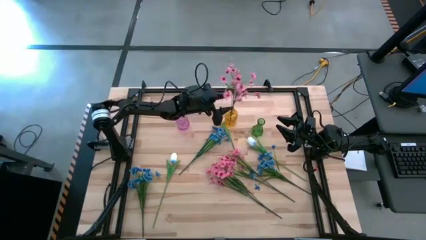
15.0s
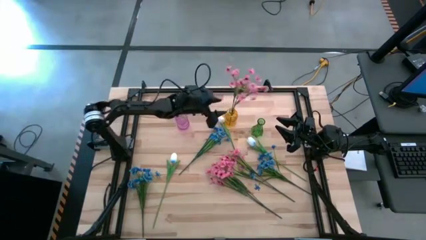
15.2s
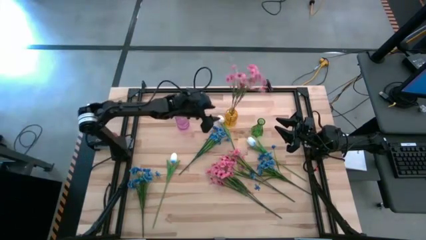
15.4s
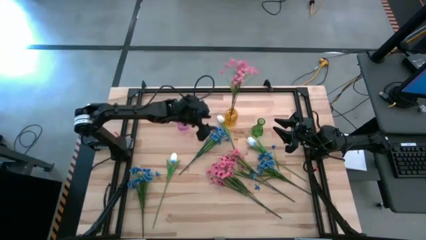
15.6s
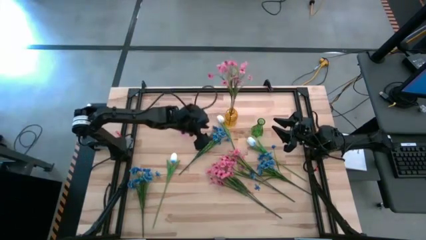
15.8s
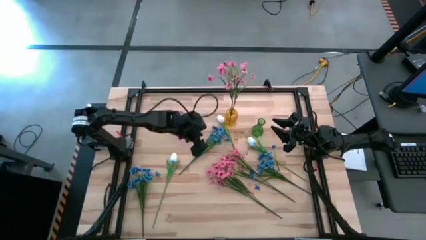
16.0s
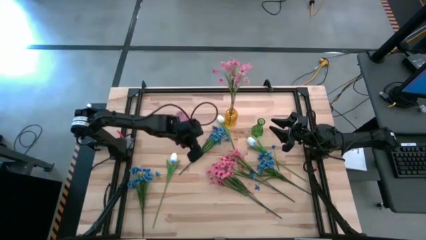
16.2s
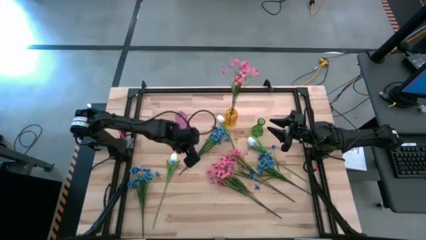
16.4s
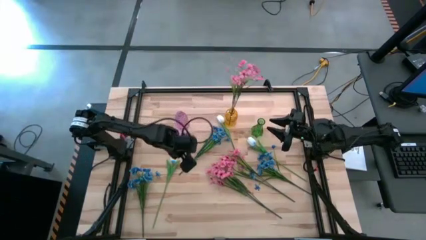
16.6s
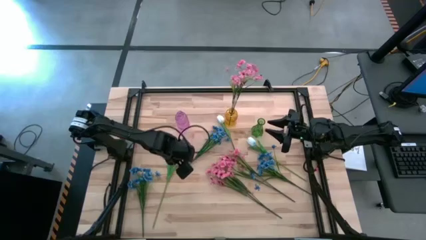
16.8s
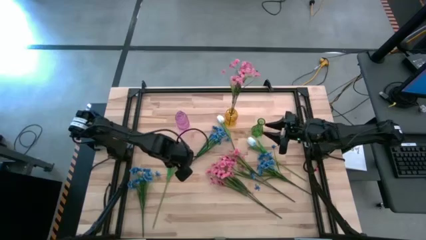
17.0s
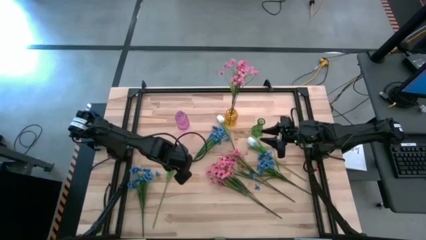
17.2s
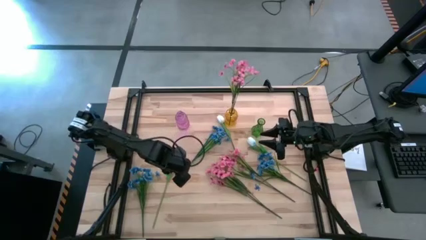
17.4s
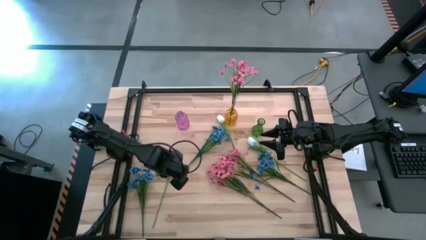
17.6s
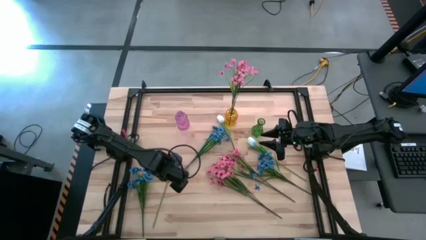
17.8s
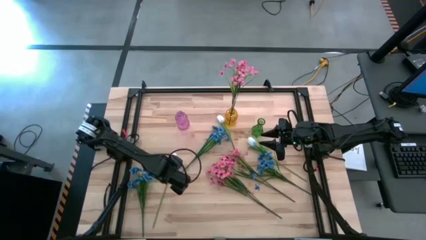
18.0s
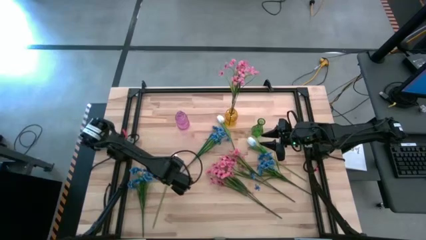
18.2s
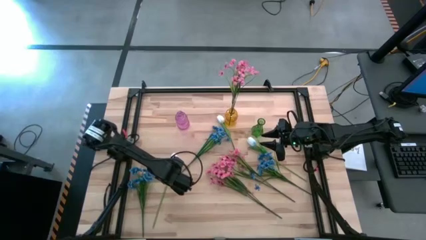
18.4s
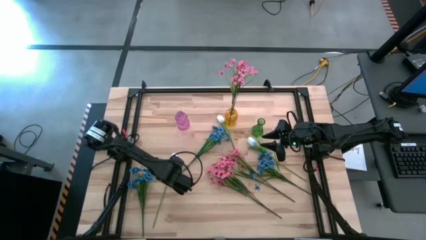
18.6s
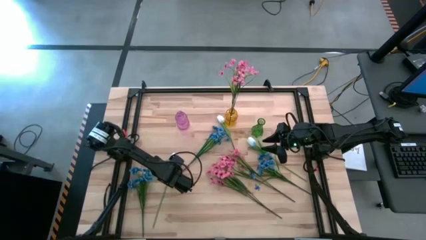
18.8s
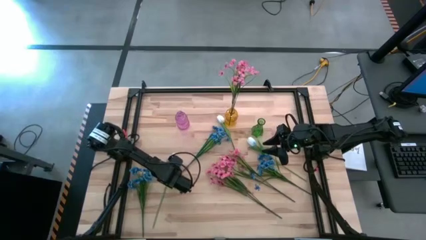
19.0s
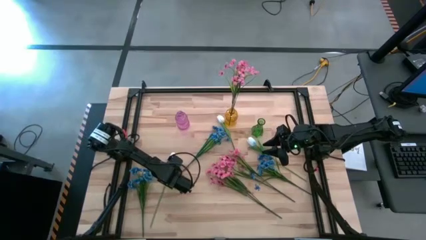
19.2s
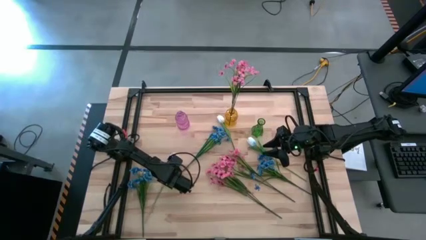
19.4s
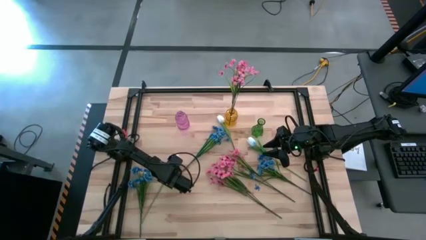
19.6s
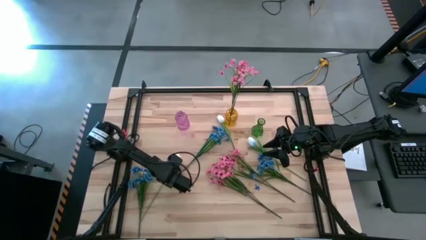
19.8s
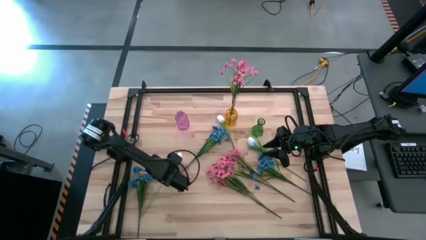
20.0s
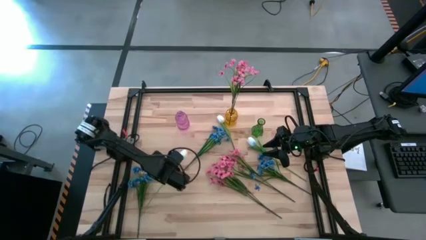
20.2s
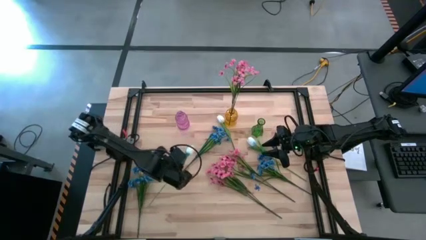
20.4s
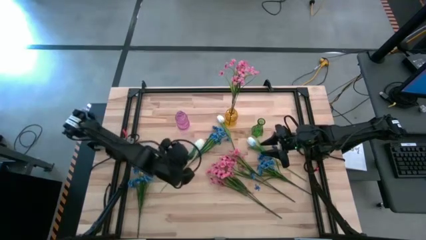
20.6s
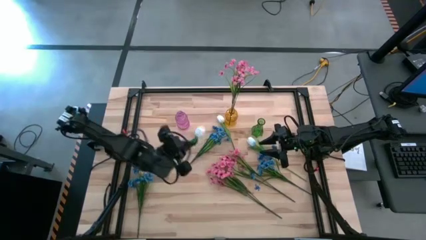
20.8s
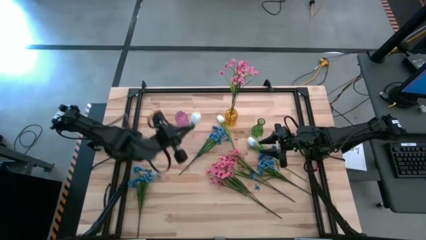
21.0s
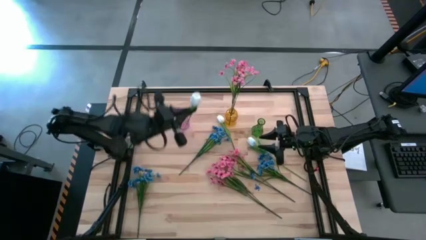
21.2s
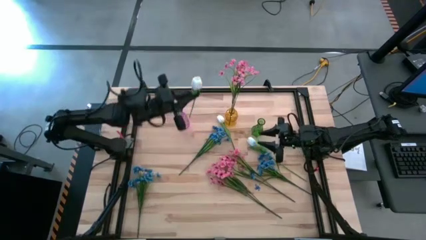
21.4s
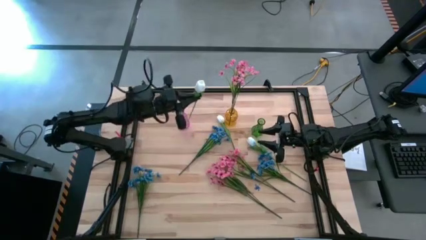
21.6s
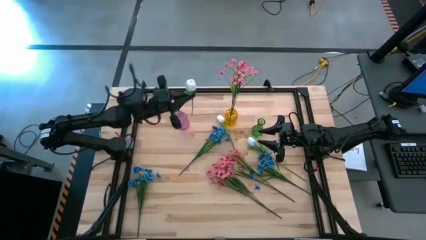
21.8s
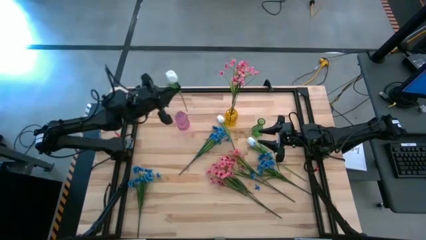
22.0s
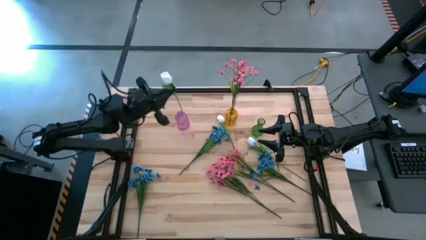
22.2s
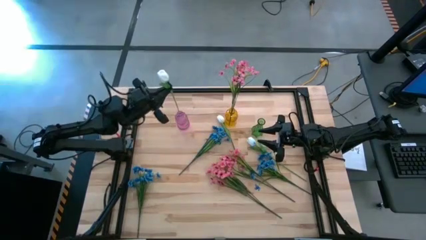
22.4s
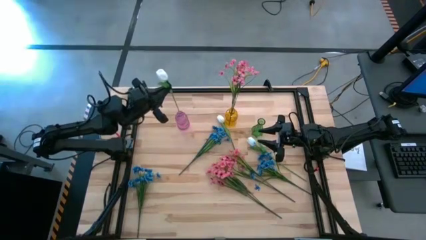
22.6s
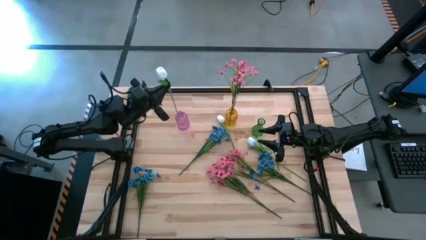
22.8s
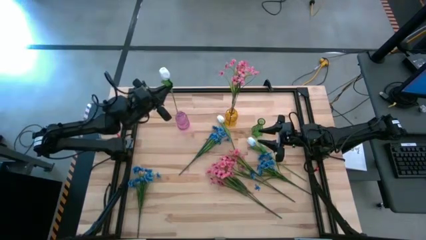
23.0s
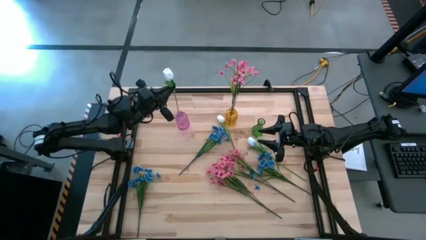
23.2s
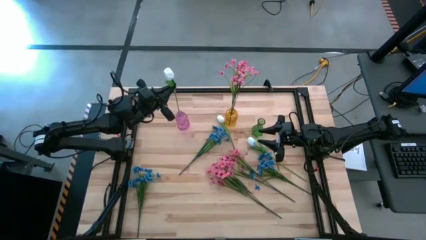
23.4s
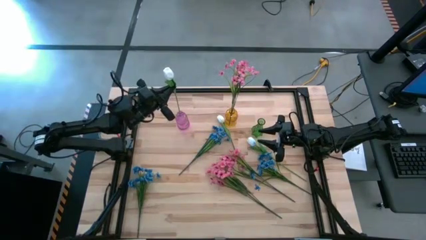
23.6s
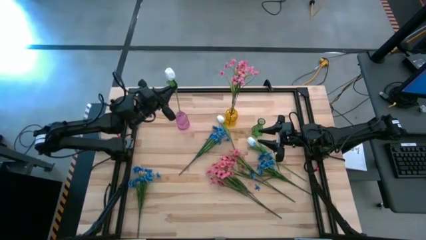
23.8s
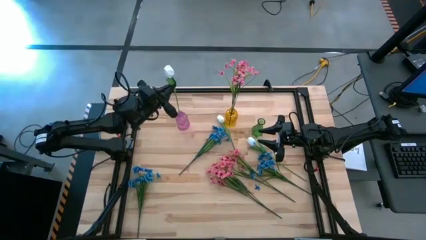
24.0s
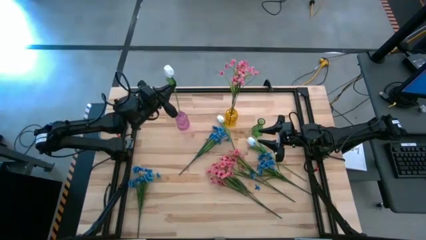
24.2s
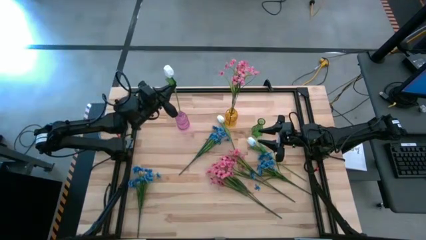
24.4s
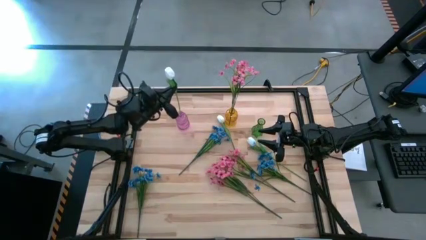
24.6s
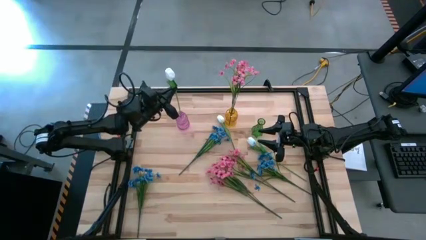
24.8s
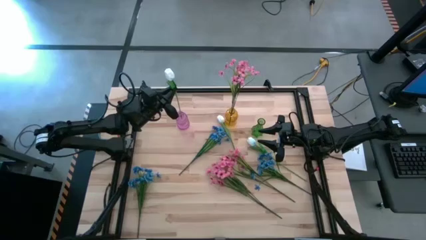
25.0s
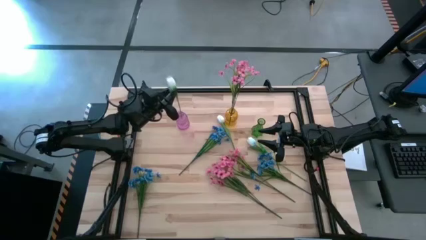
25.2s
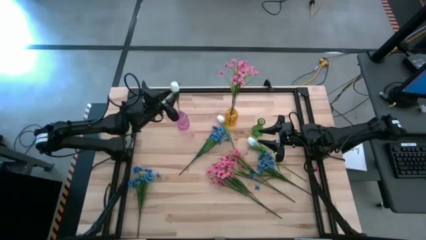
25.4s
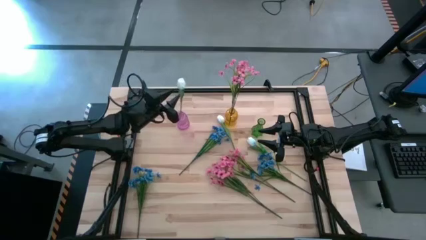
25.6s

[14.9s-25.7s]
Task: Sort flowers into vase by color
Put the bottom left white tulip into the violet vase
